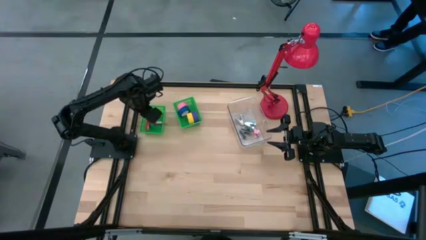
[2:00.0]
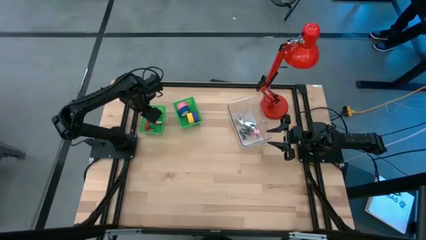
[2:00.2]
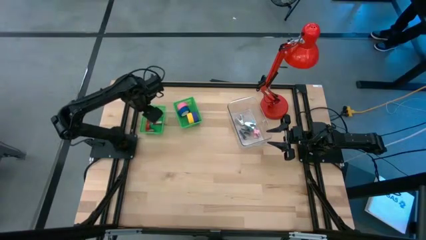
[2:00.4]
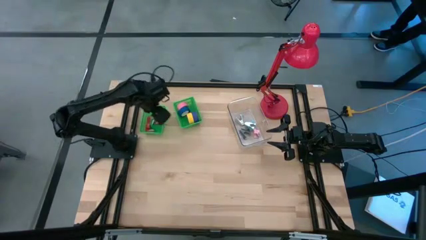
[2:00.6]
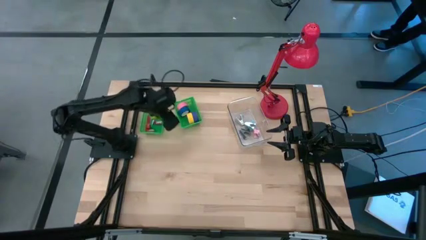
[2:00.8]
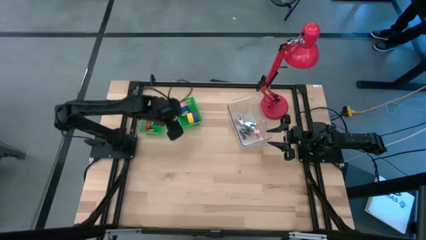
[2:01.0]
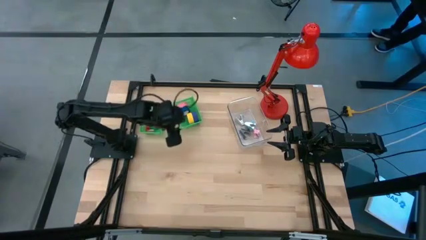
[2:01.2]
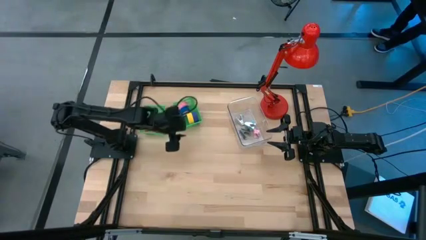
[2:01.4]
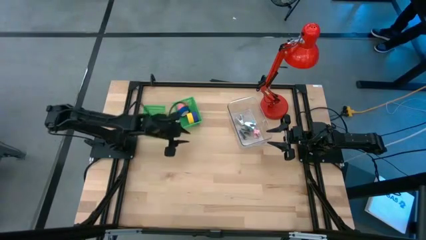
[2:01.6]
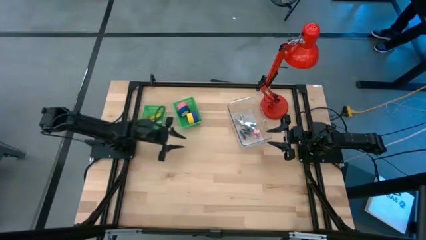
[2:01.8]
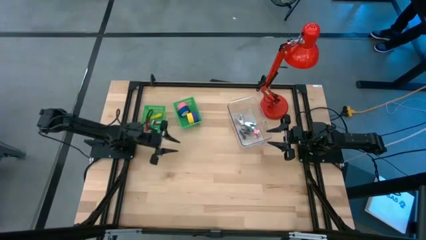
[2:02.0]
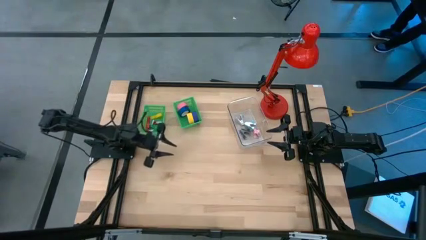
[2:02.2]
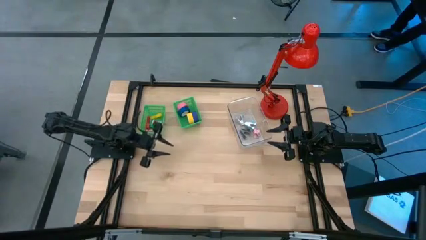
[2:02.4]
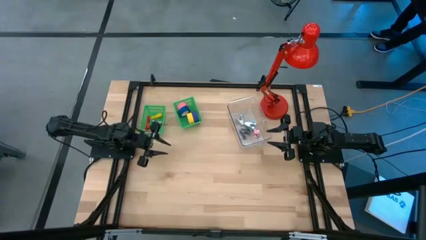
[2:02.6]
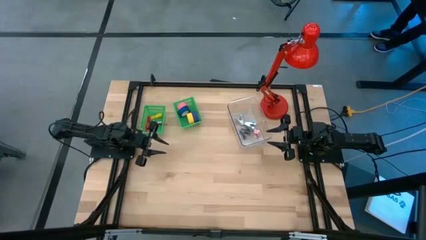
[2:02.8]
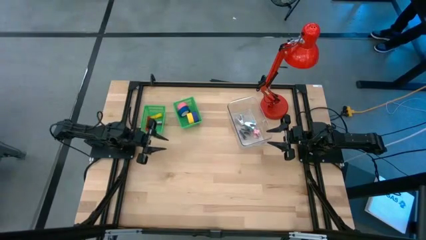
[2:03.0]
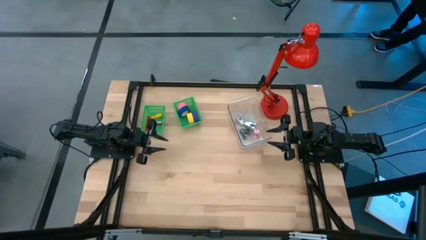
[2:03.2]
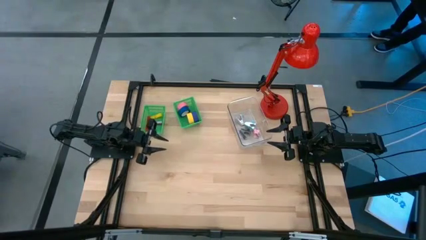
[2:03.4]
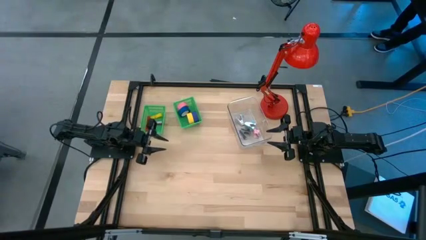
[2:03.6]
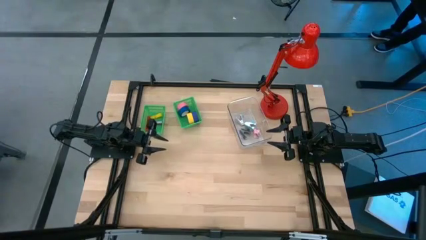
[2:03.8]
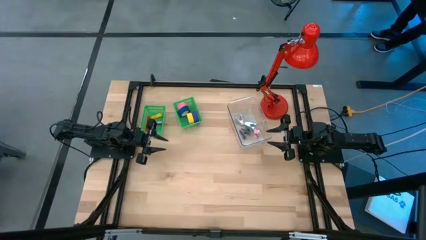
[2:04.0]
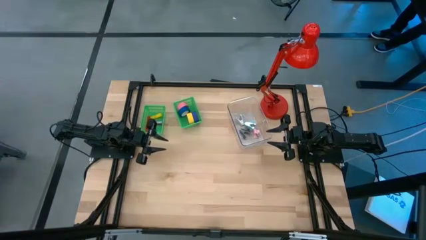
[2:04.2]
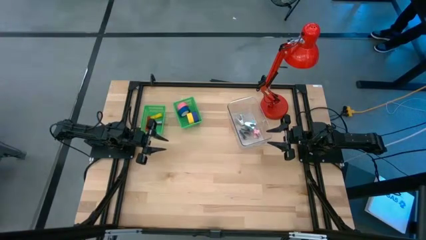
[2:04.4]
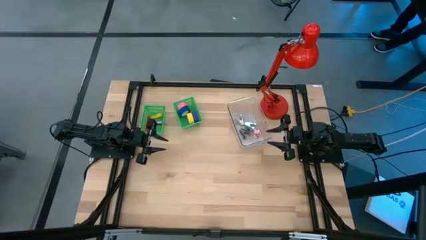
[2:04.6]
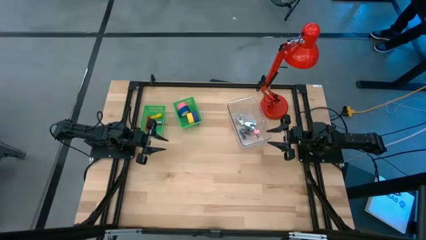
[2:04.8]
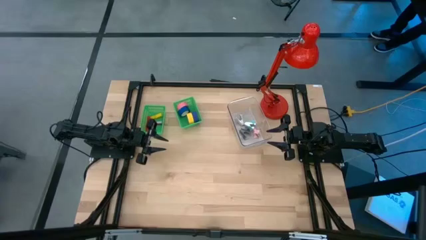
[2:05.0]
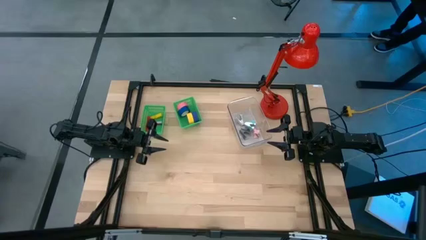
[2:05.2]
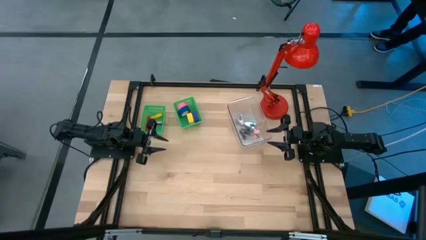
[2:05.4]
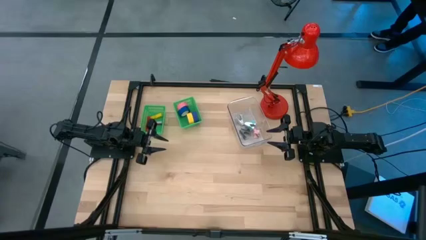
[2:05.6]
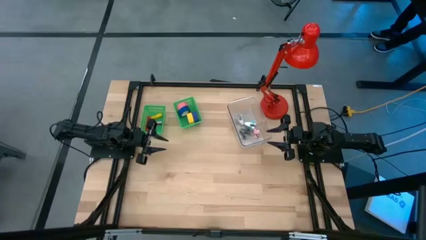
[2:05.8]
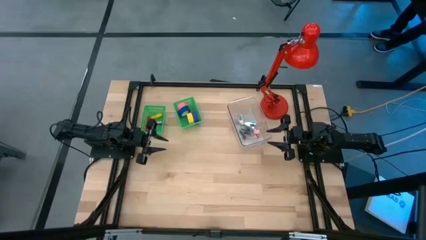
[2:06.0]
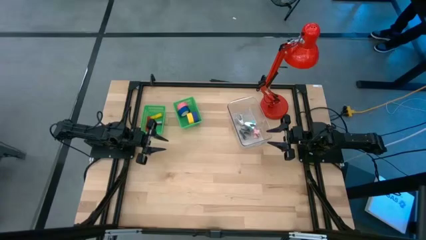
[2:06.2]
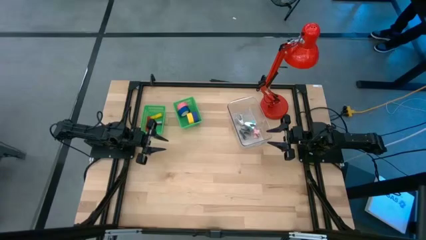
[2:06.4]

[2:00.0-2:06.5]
Task: Pick and place Stapler, Stapler remover, tape
Return to Home Position

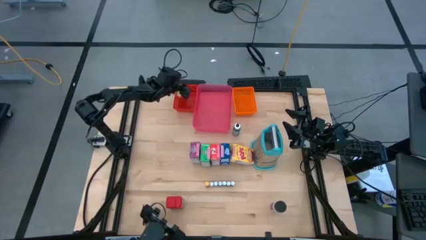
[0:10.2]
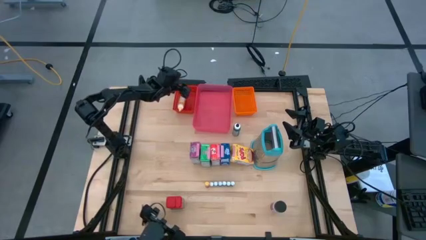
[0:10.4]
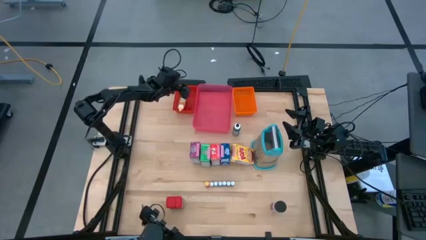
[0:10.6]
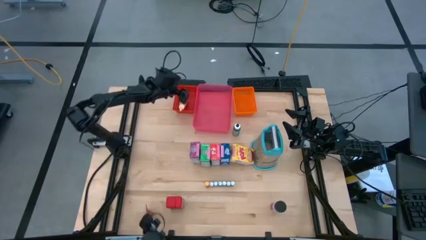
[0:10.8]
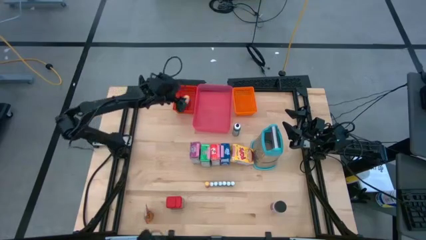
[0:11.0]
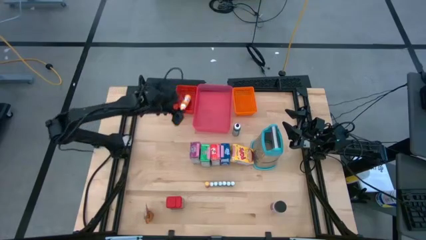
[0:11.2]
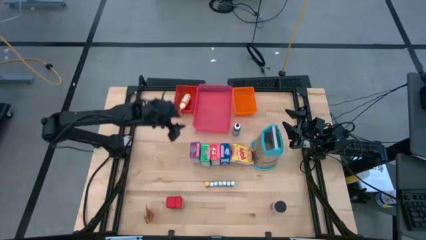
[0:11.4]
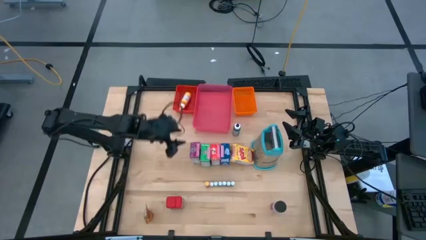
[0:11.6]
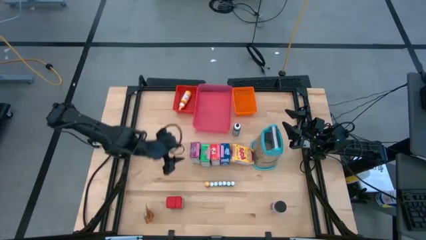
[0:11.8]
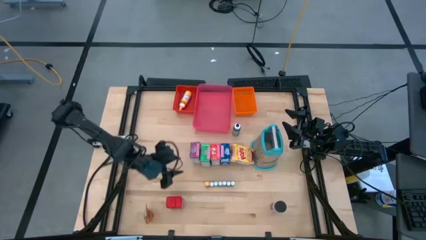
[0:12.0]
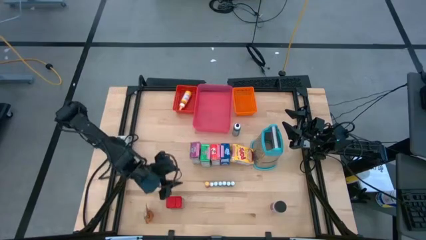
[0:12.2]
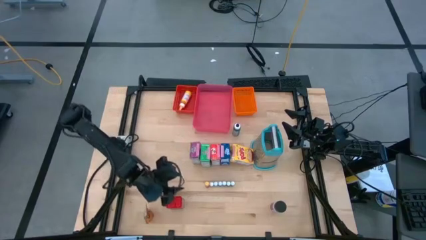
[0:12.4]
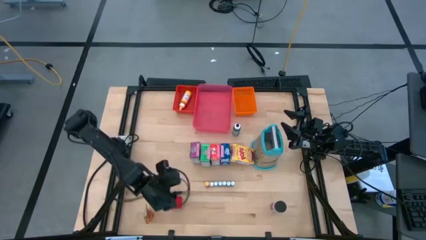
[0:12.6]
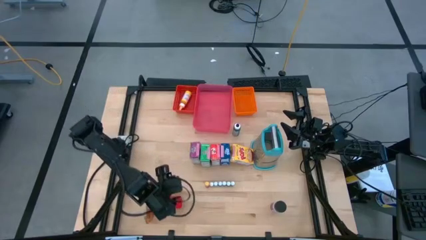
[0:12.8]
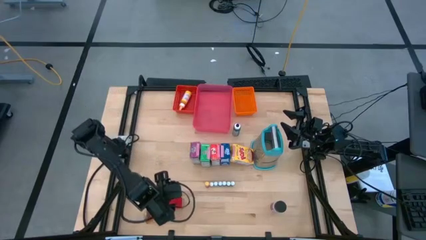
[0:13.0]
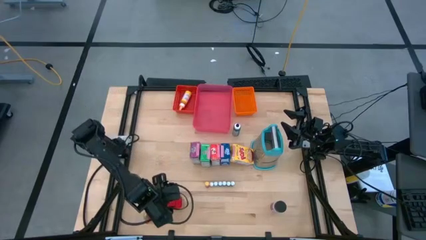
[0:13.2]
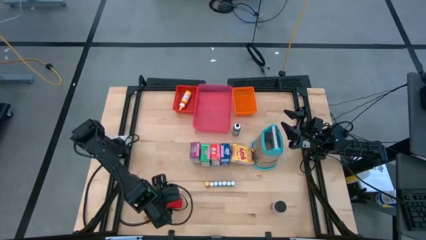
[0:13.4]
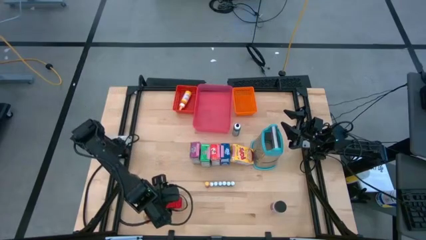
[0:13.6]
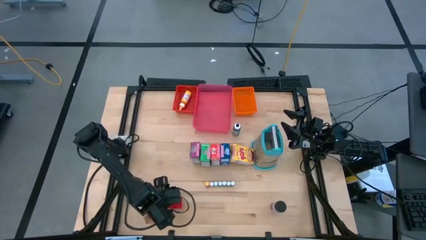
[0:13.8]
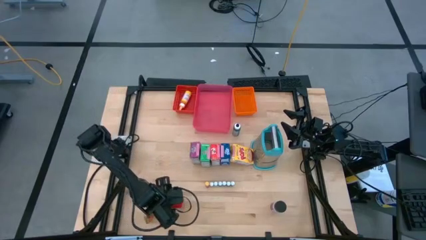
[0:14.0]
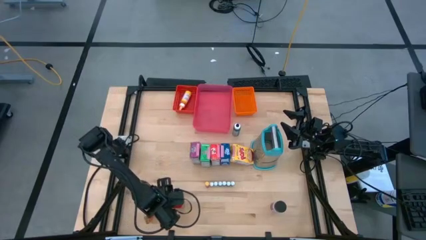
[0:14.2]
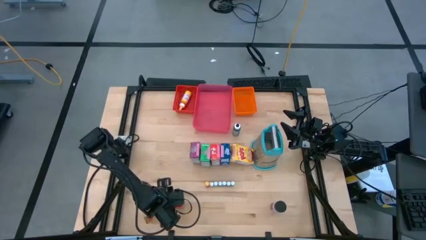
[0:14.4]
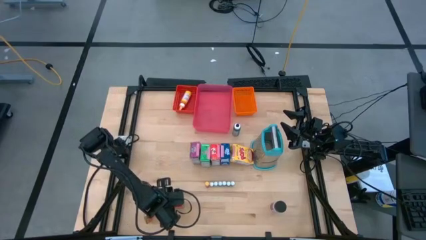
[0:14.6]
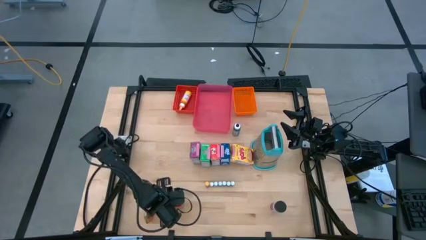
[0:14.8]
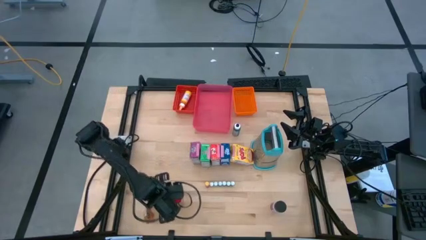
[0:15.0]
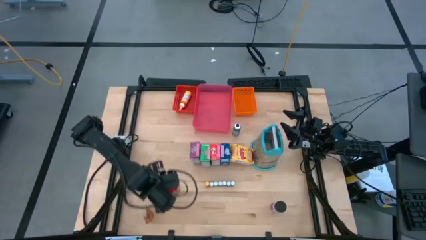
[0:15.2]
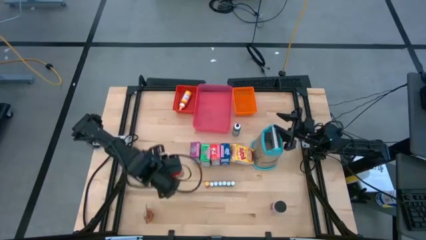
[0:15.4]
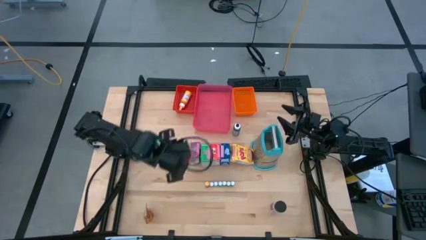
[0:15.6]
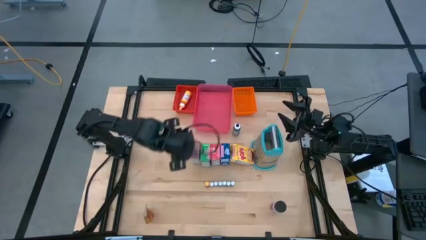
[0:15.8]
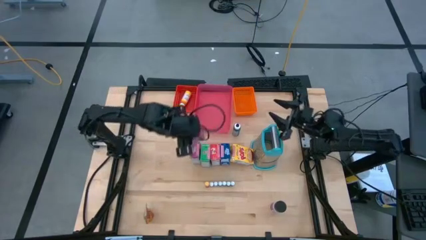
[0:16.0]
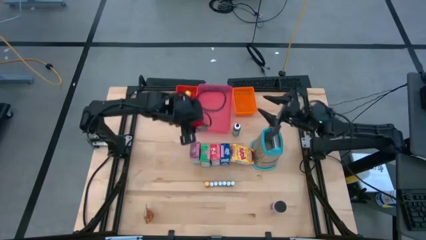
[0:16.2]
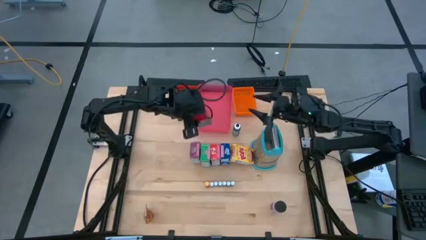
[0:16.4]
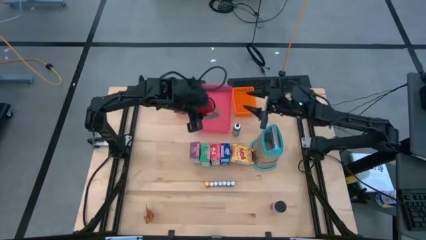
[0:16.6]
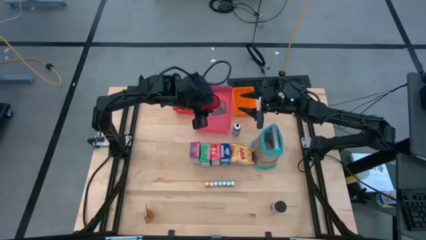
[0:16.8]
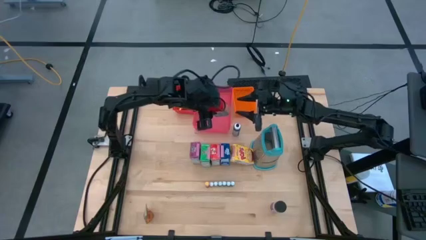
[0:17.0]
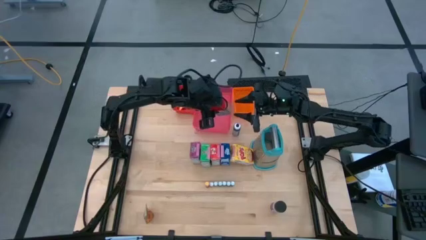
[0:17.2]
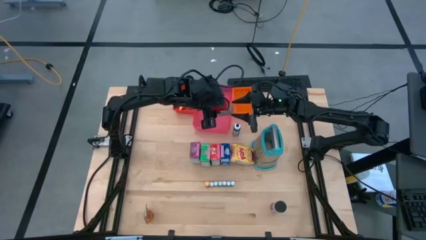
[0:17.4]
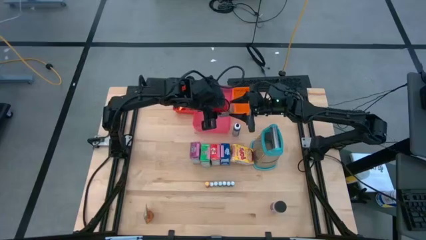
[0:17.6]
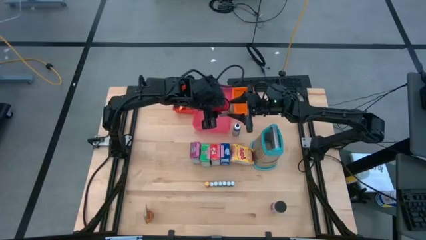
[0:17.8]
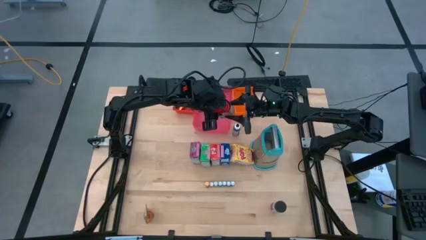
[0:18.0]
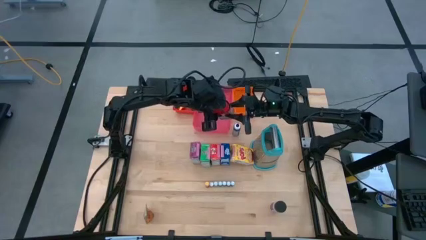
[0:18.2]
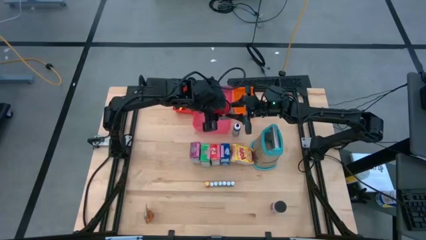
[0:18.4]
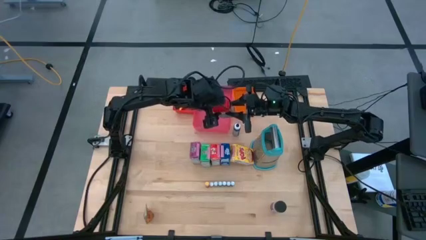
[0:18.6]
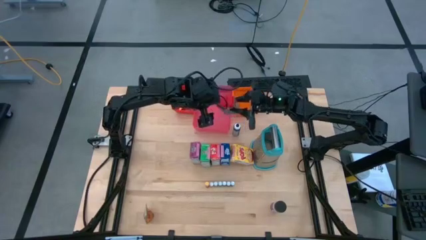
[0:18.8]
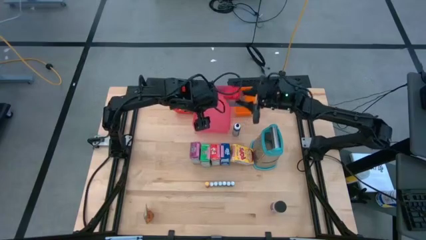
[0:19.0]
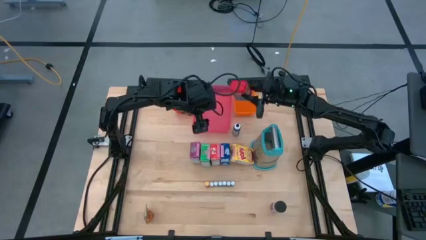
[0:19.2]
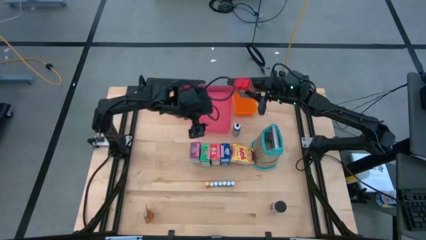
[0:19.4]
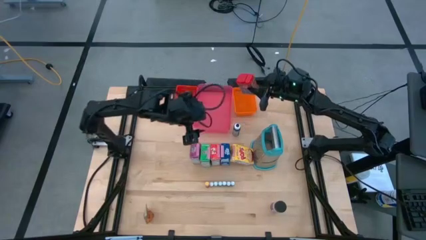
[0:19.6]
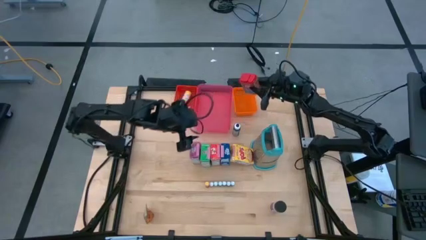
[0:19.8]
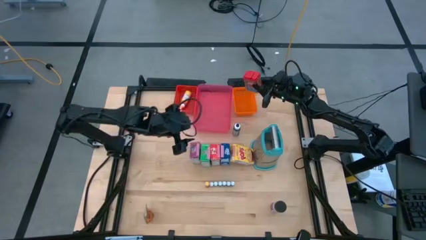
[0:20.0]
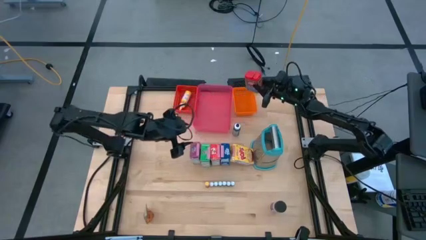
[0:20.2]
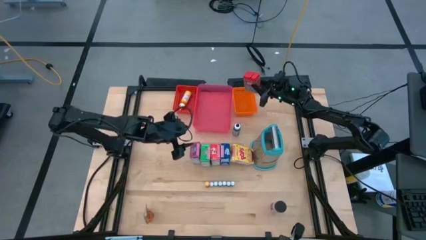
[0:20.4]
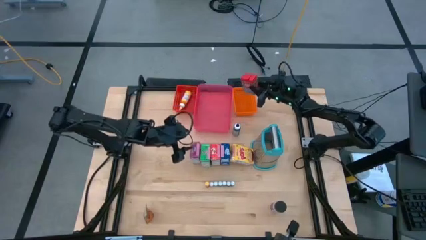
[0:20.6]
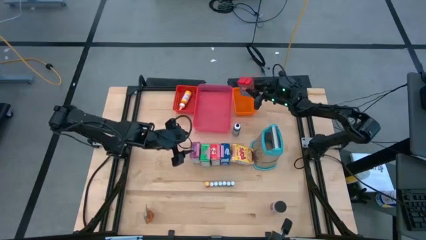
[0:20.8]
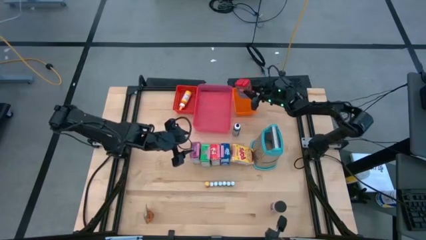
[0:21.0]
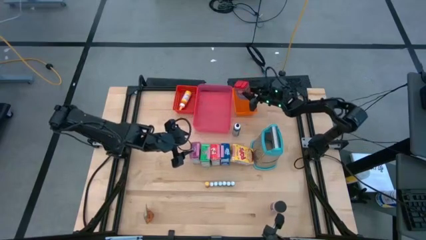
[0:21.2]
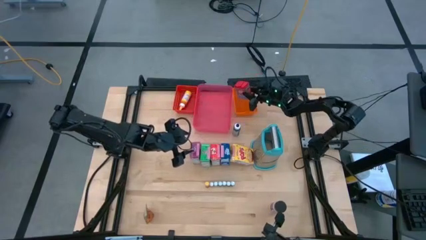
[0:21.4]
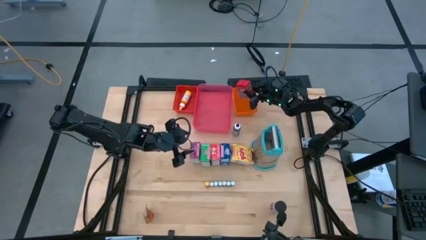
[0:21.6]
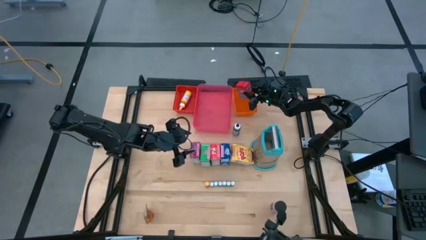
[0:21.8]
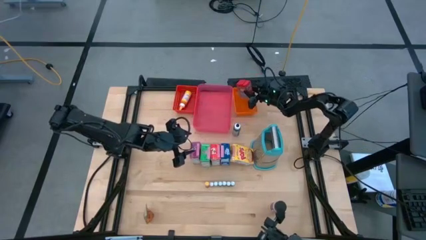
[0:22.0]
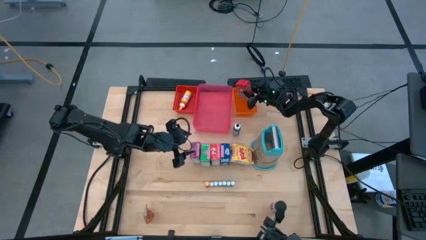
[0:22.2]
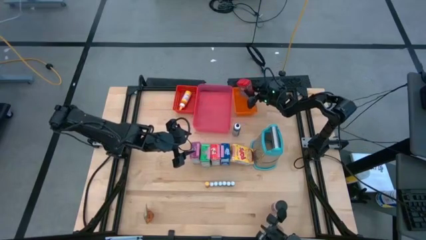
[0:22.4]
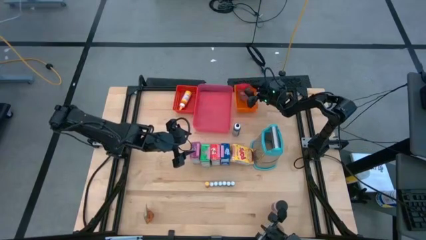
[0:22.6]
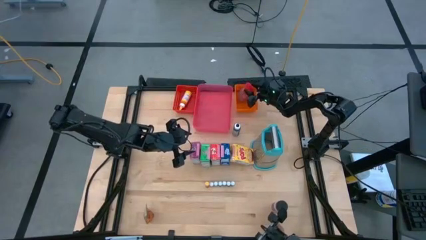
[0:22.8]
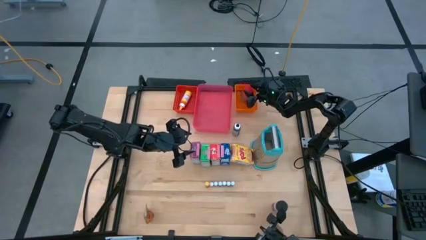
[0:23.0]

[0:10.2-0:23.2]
Task: Pick & Place Kitchen Items
Put the red seasoning can into the orange bin
